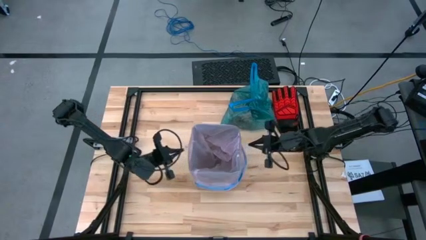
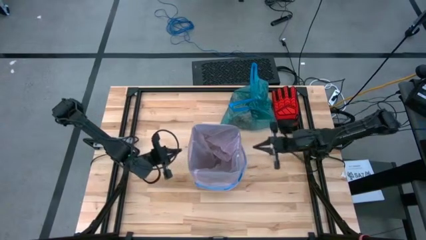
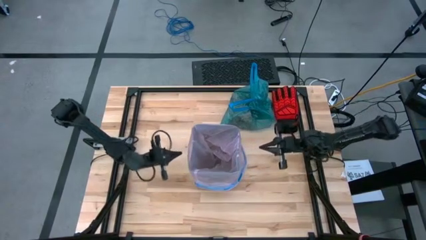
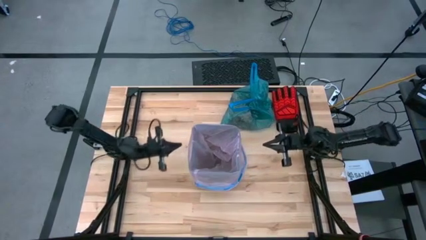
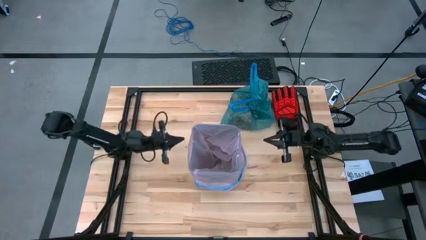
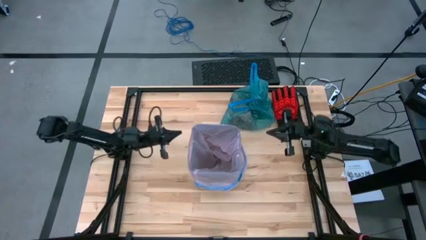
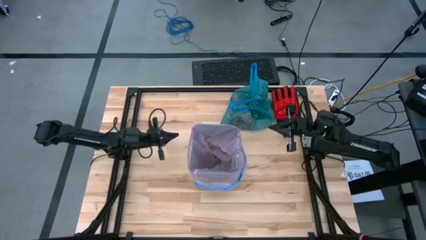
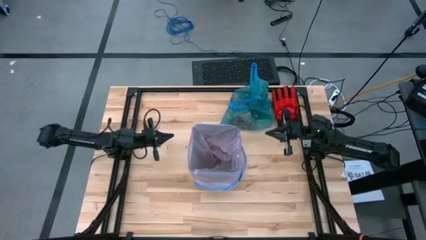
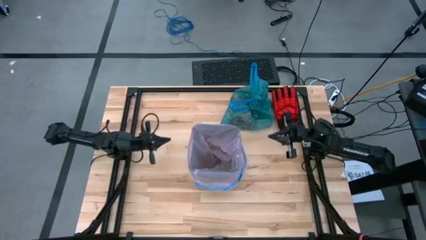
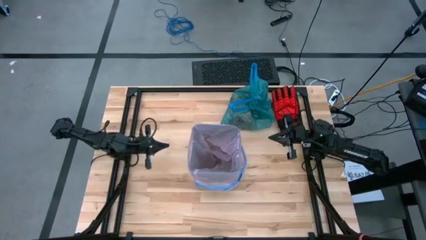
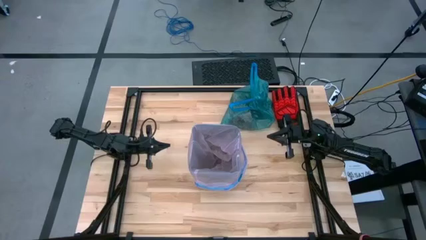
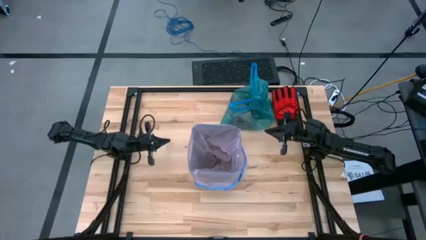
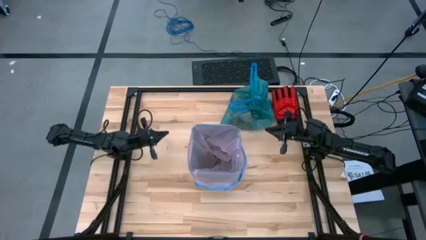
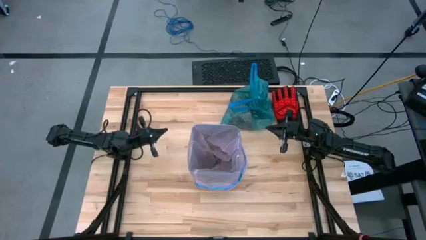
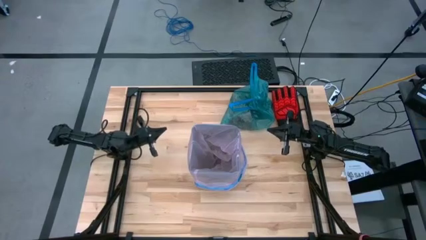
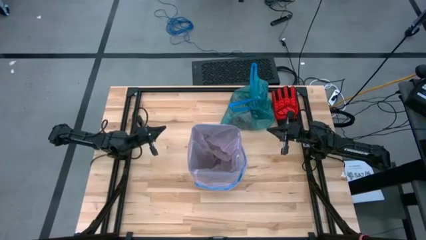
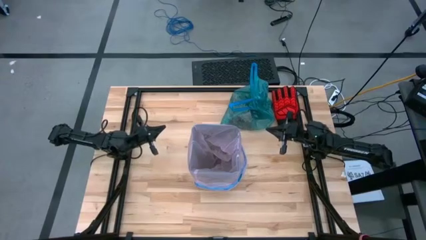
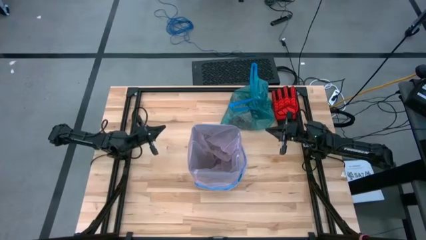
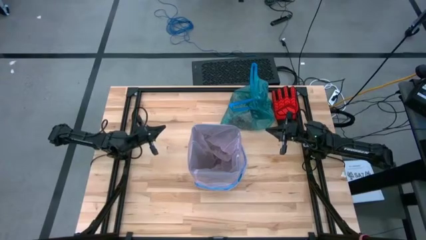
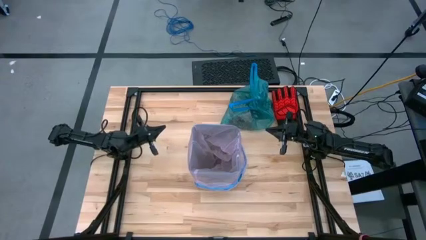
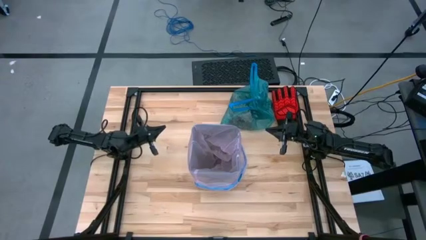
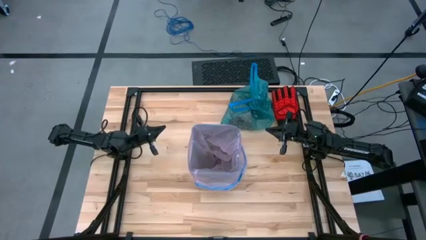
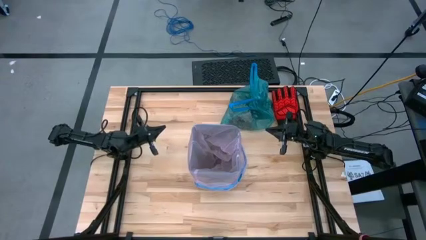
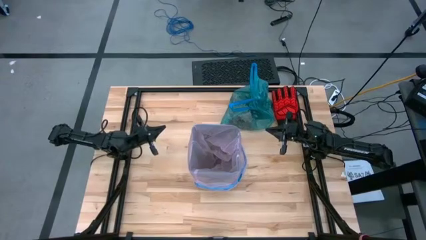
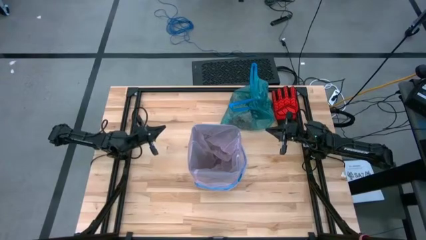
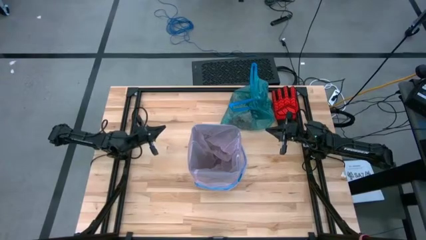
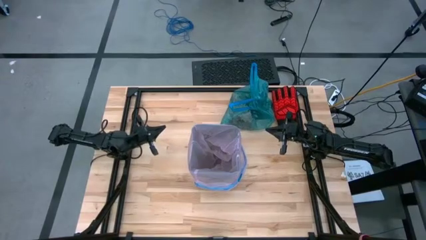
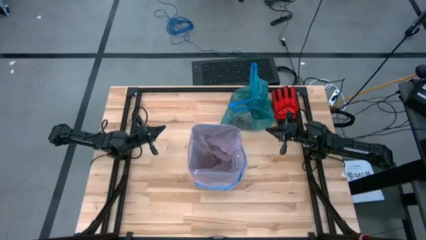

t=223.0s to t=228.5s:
Task: place trash/remove bag and relplace
Return to Home Position

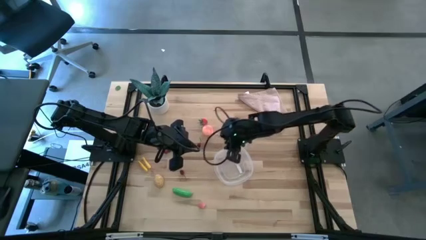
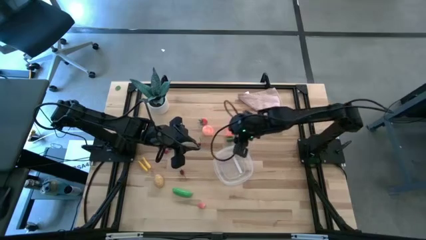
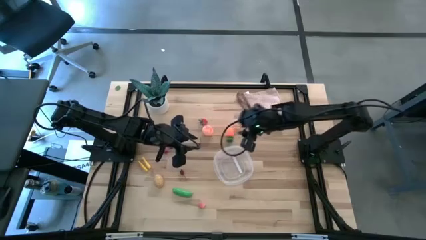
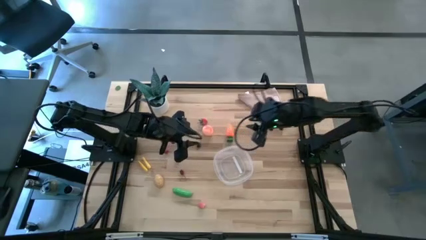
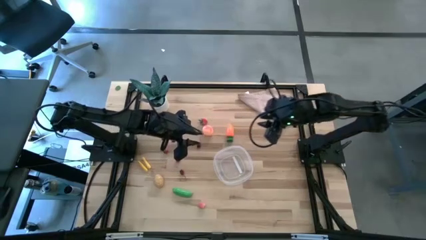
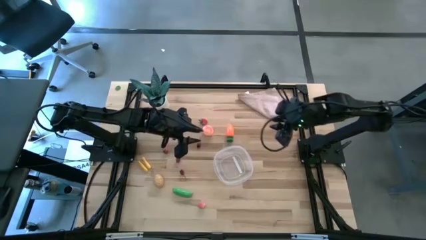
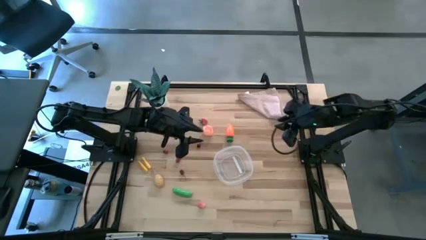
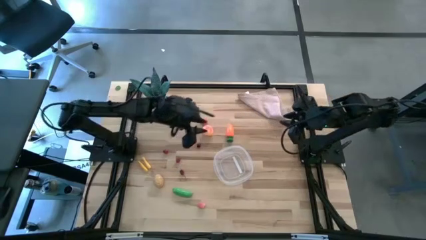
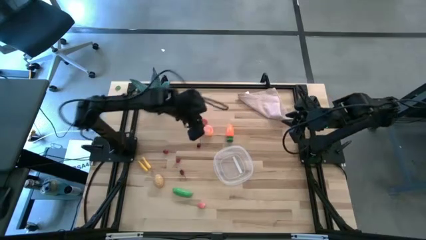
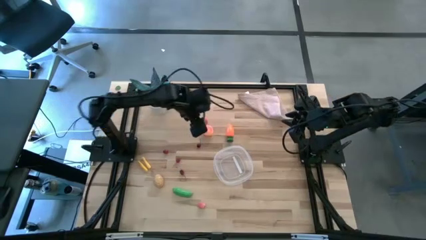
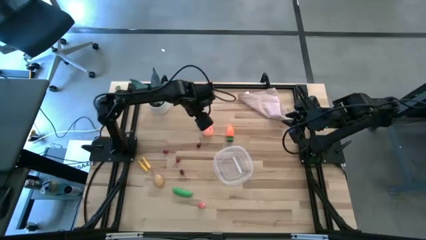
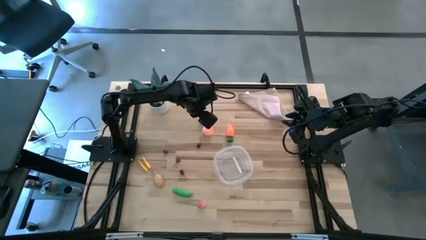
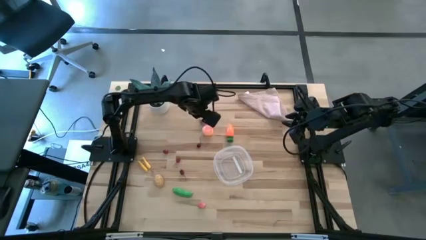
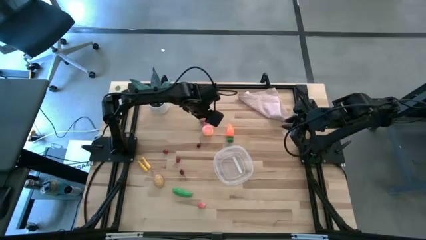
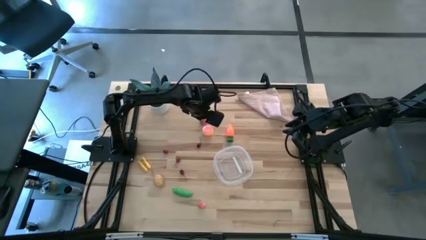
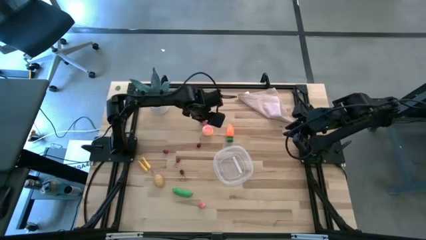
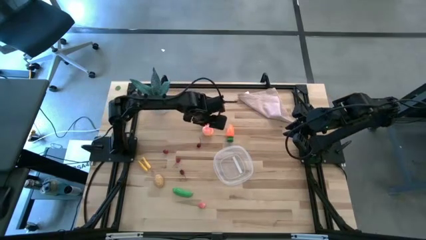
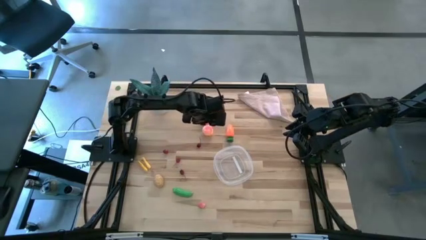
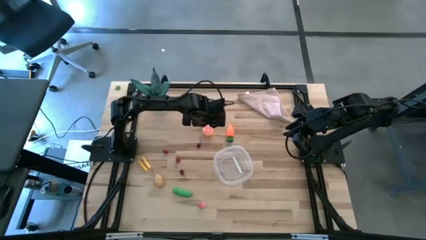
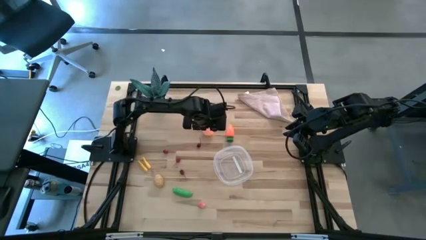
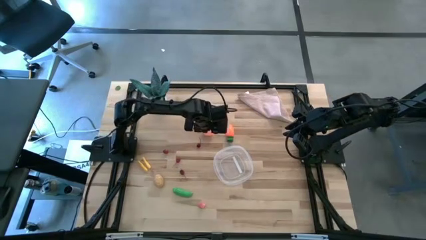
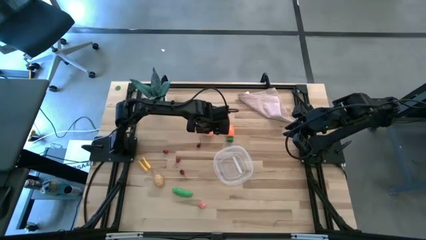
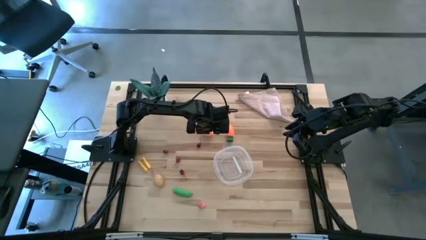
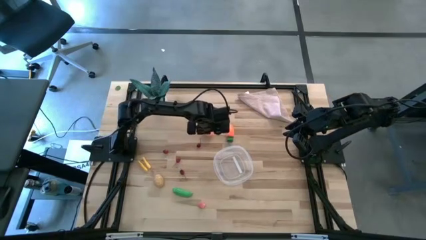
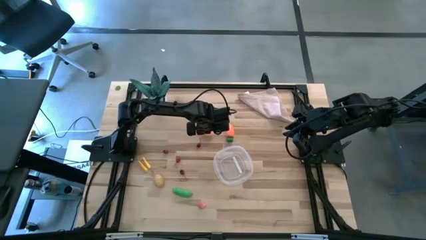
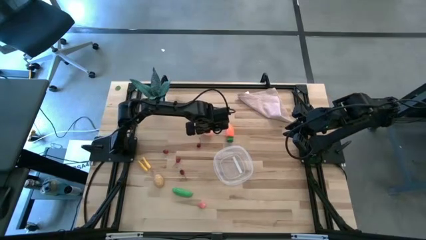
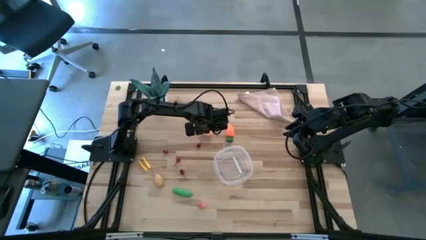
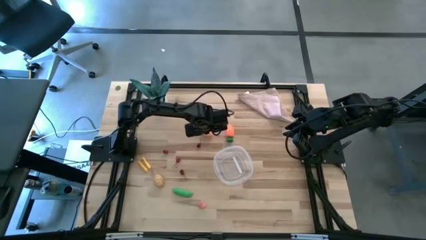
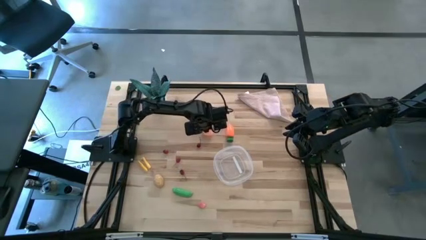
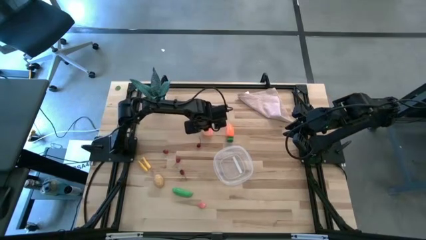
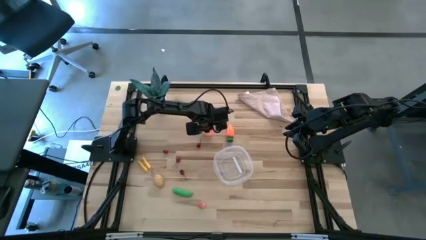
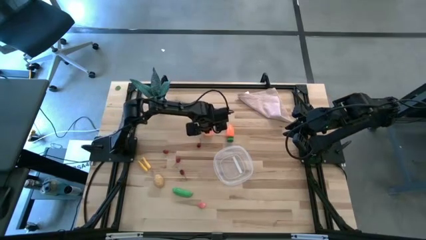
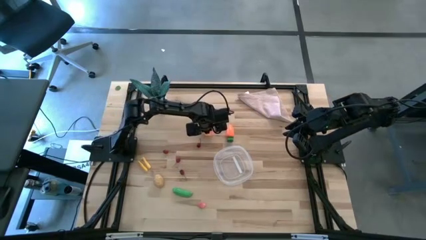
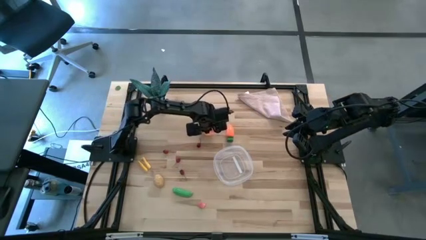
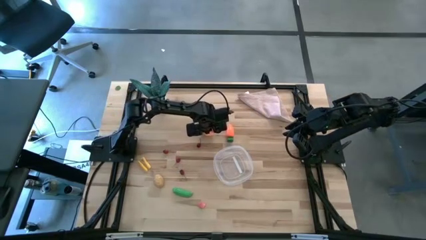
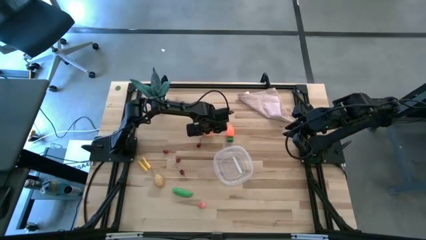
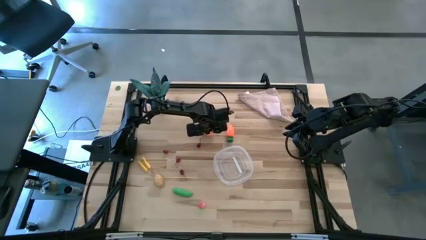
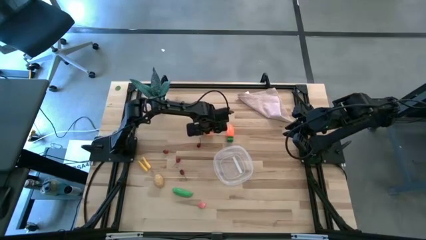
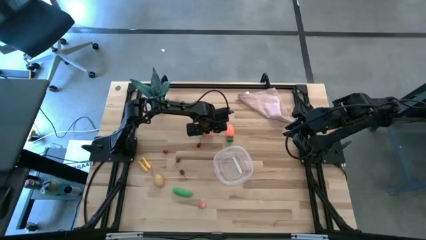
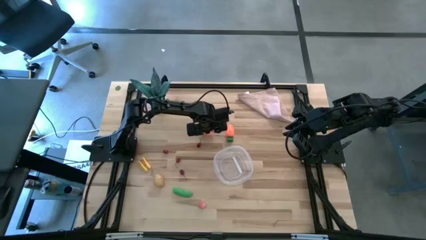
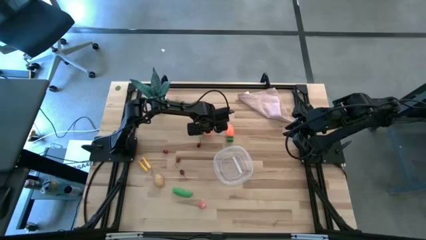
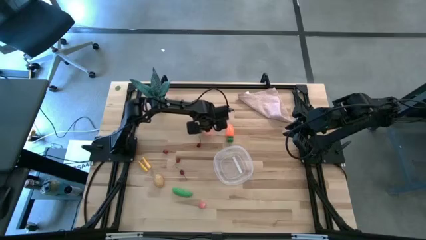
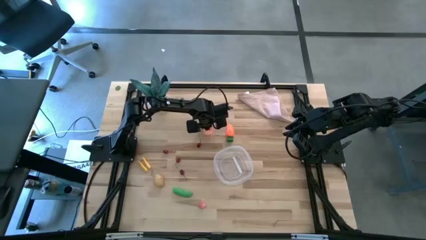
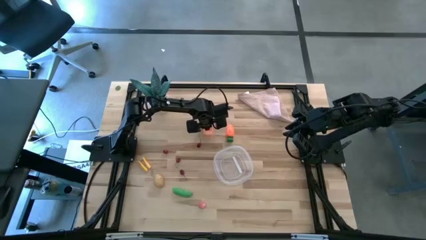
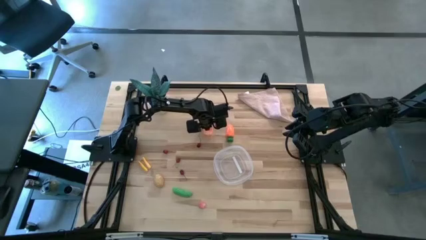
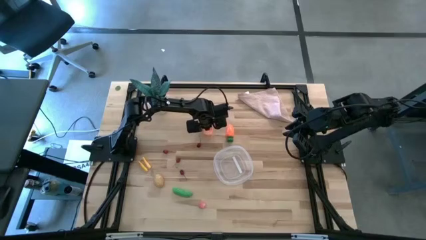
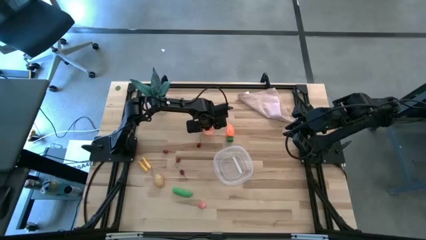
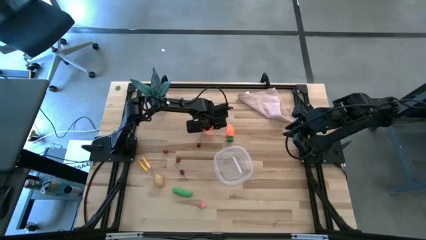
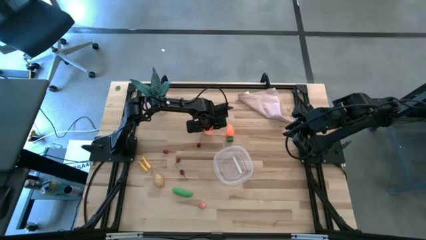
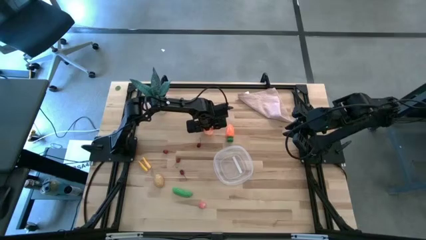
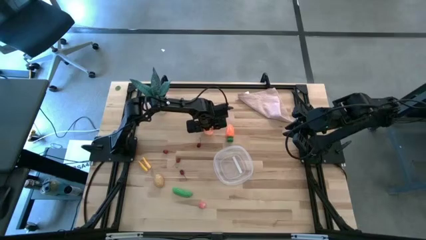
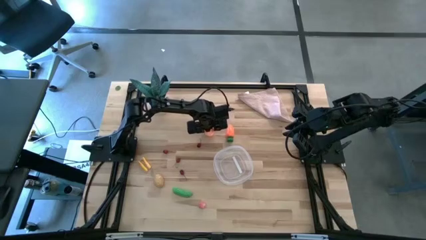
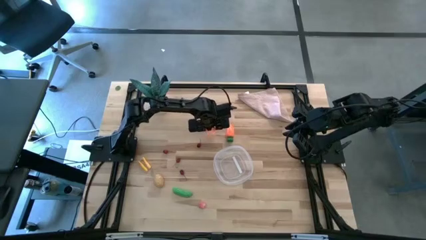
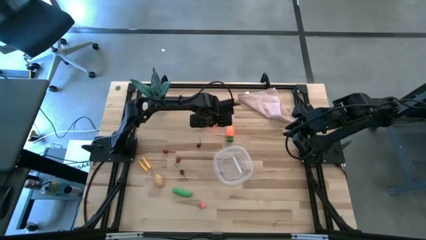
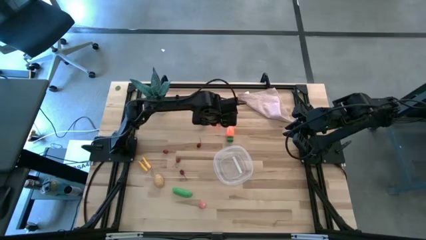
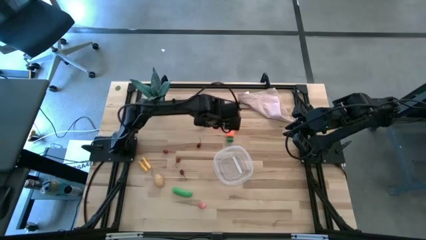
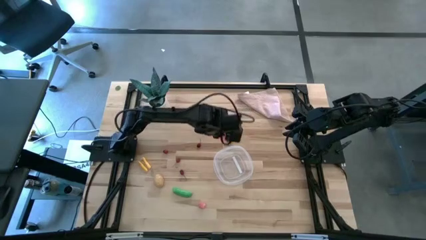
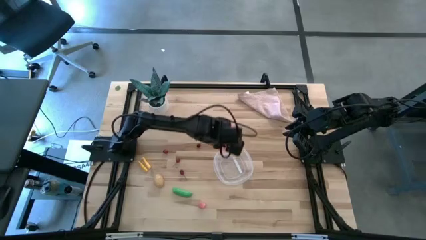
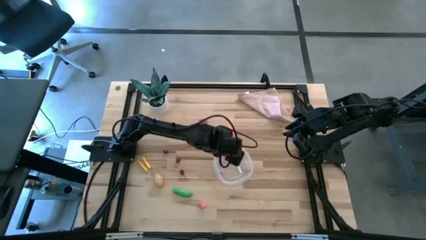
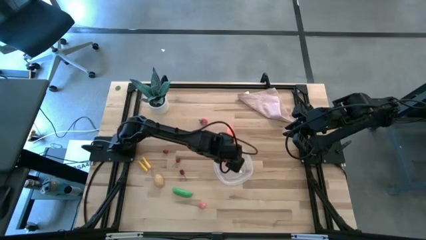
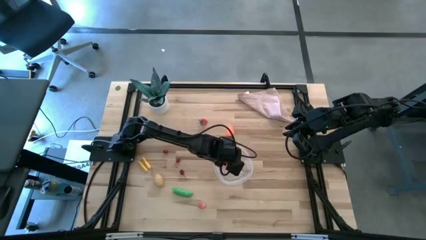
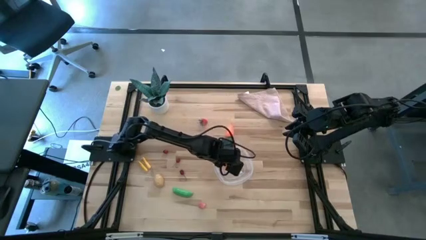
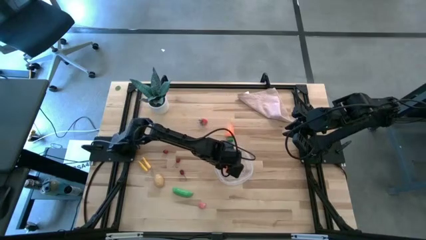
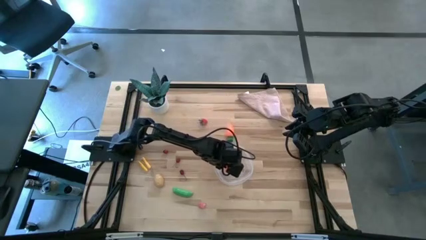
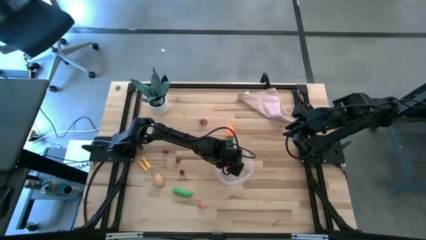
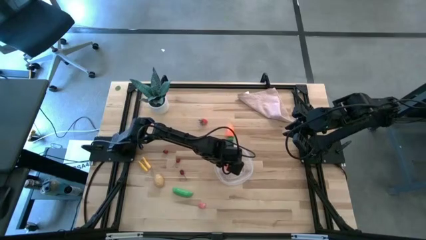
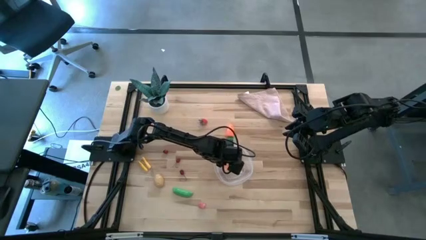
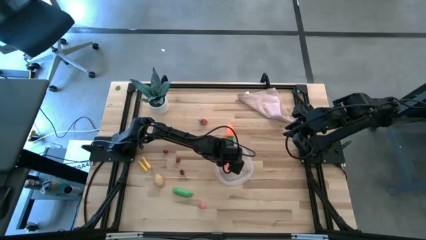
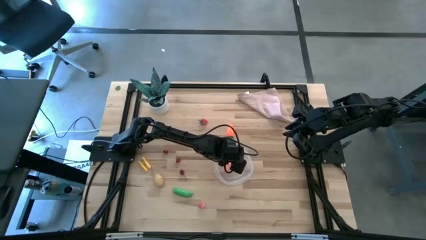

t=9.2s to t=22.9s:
Task: Pick and placing Produce into tupperware
Put the pink peach into the transparent bin
